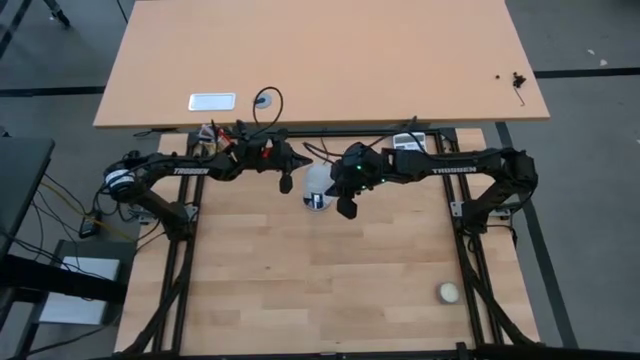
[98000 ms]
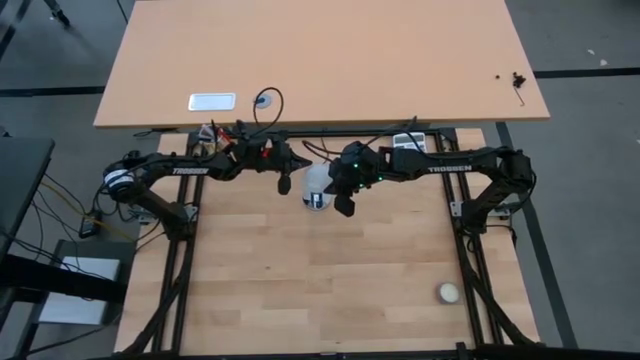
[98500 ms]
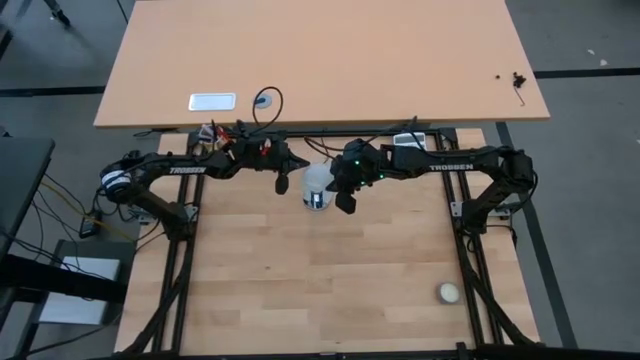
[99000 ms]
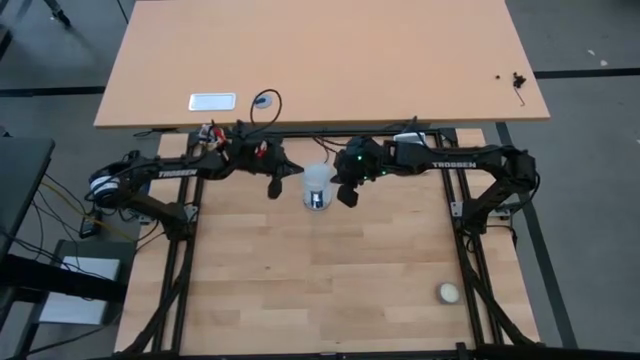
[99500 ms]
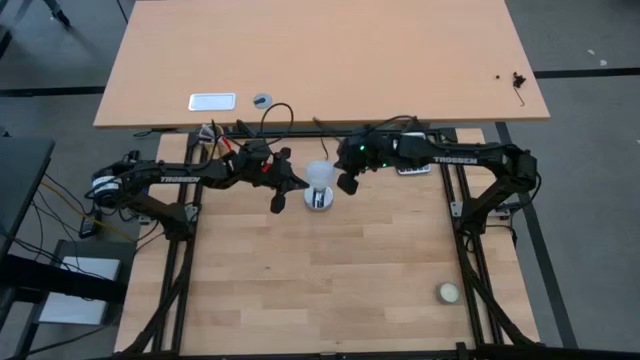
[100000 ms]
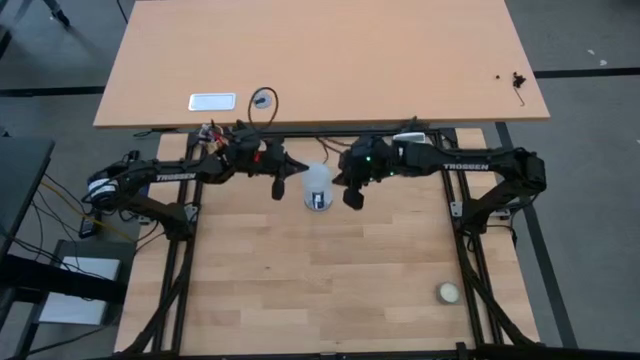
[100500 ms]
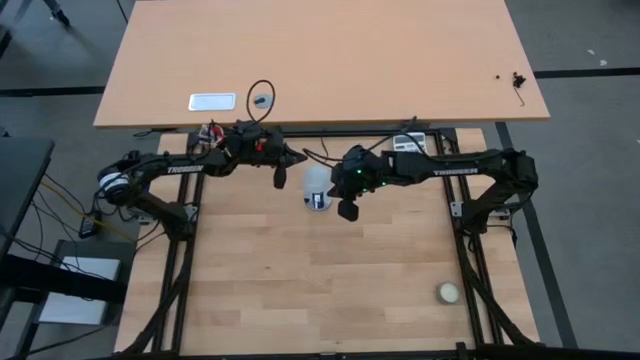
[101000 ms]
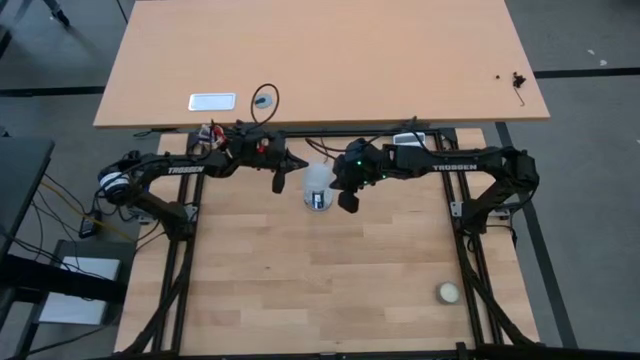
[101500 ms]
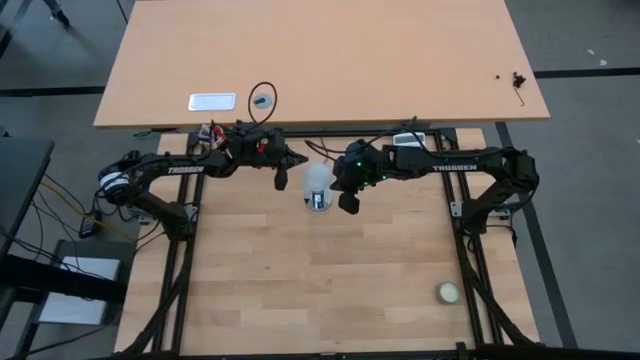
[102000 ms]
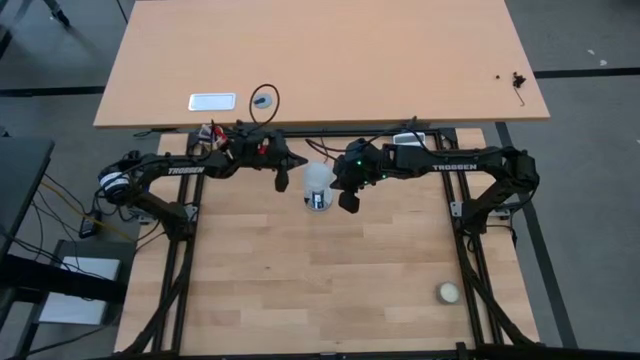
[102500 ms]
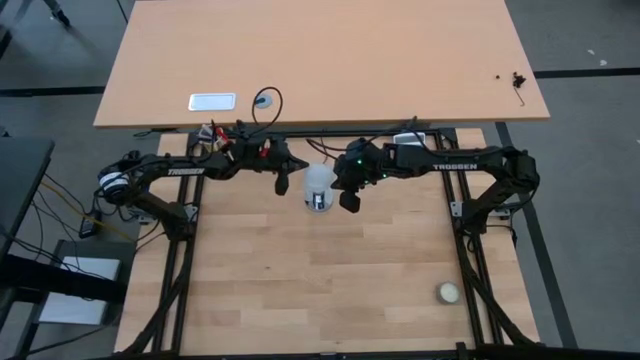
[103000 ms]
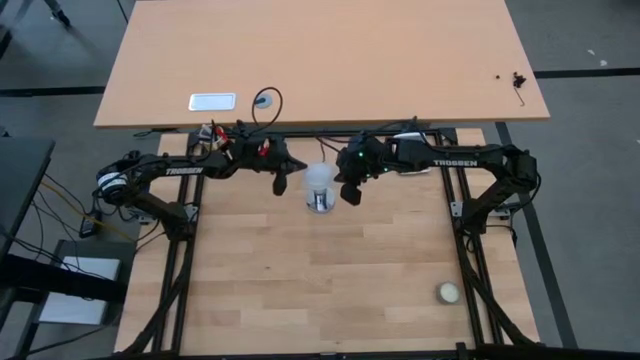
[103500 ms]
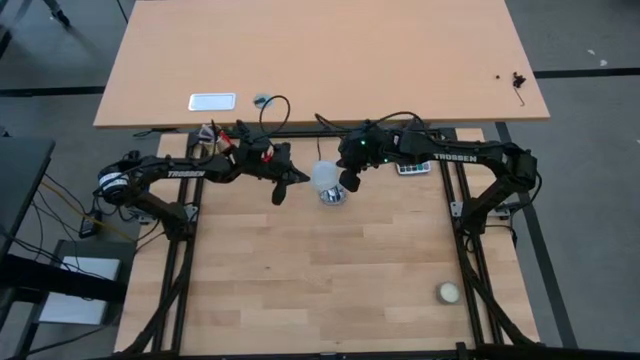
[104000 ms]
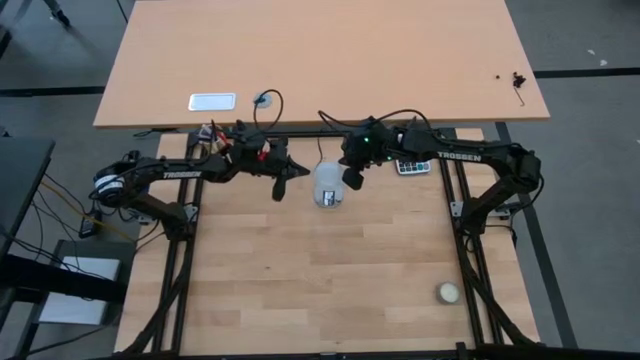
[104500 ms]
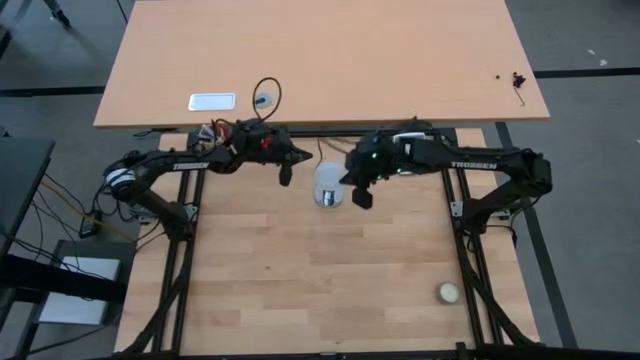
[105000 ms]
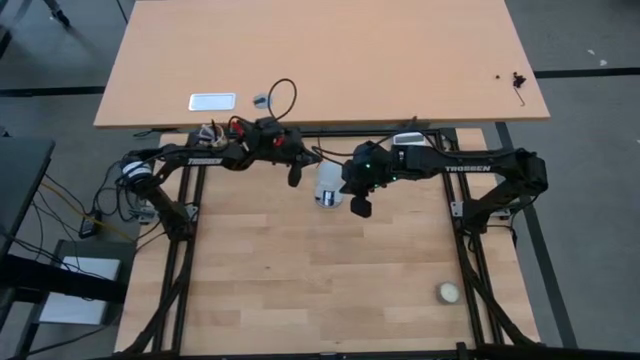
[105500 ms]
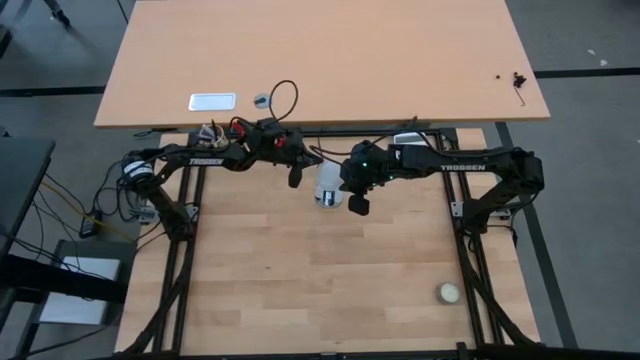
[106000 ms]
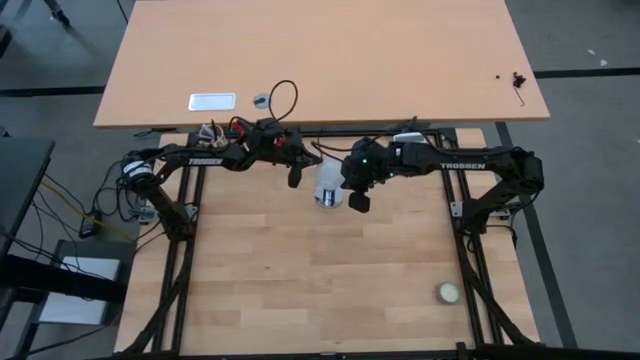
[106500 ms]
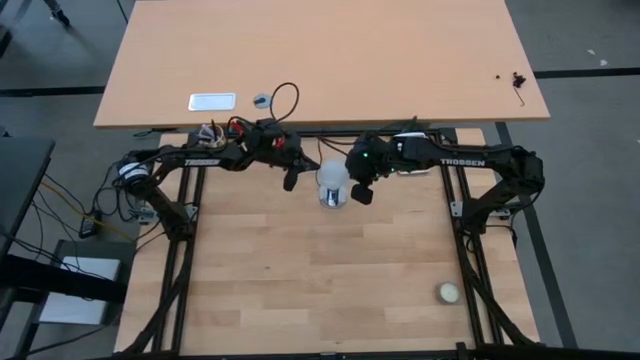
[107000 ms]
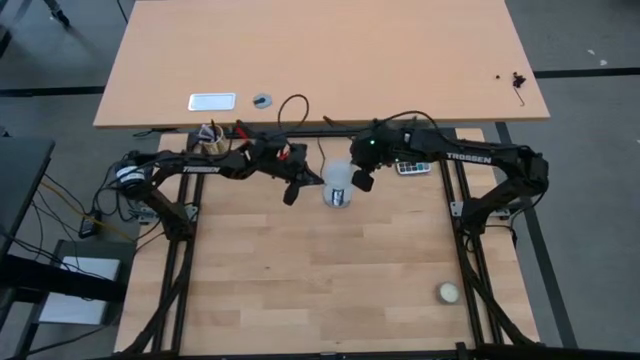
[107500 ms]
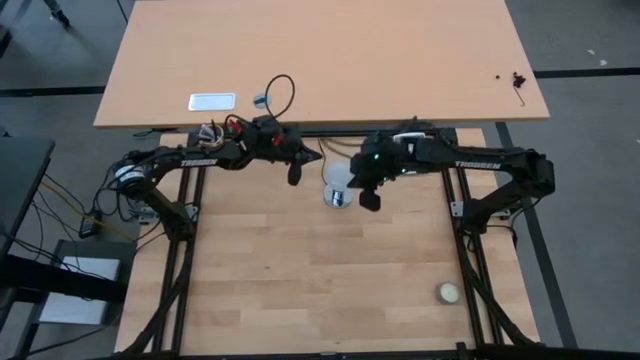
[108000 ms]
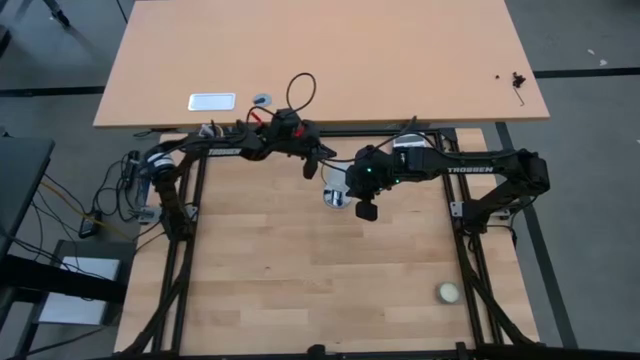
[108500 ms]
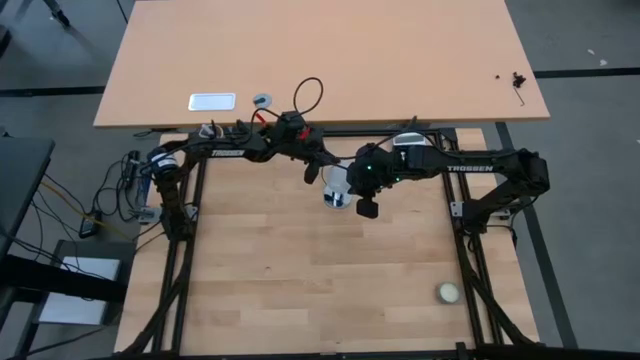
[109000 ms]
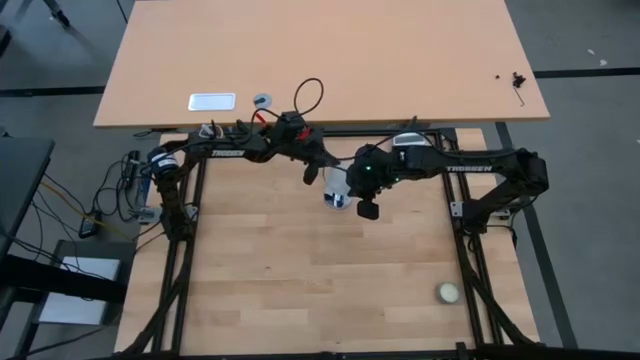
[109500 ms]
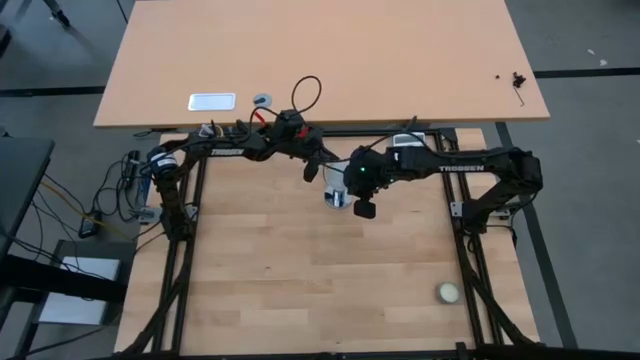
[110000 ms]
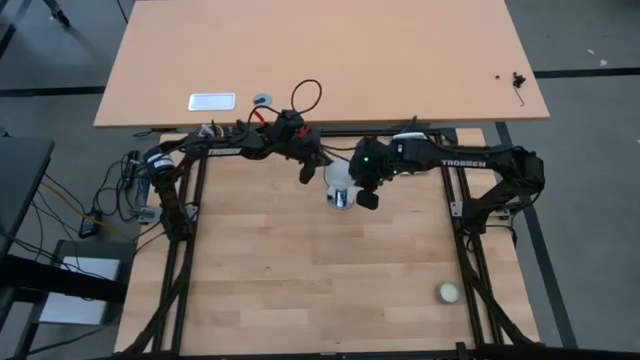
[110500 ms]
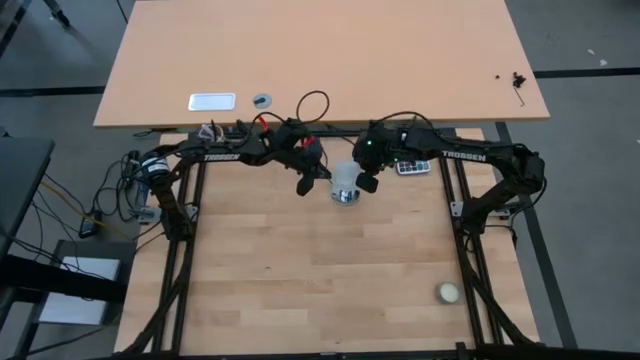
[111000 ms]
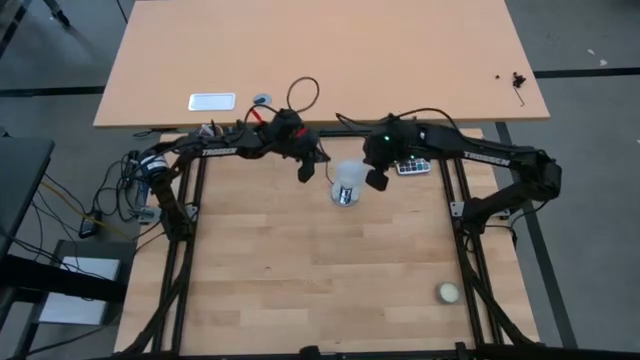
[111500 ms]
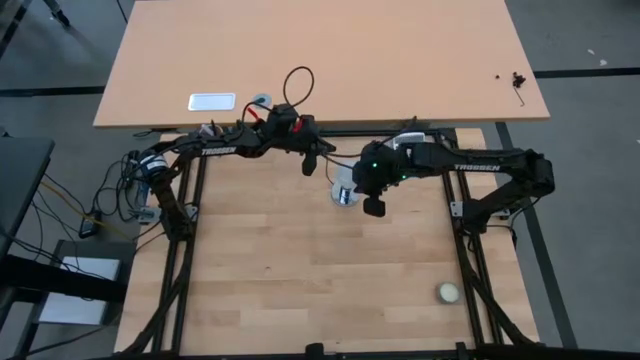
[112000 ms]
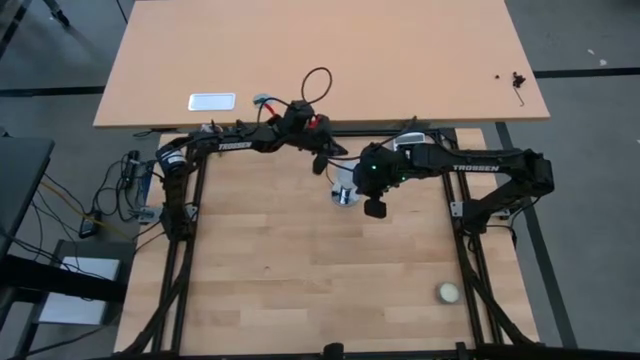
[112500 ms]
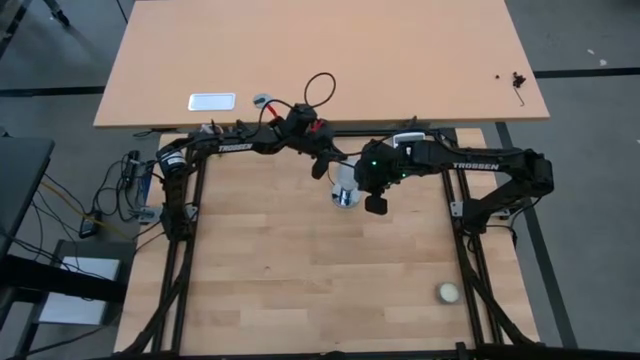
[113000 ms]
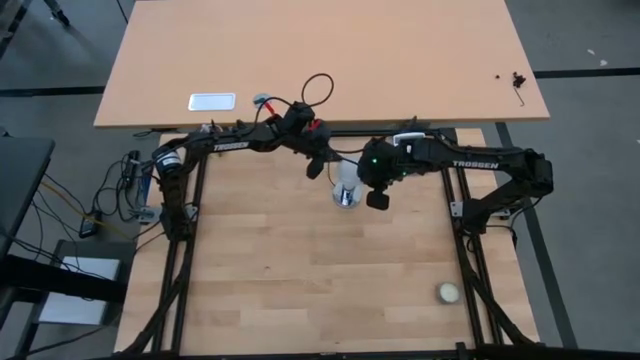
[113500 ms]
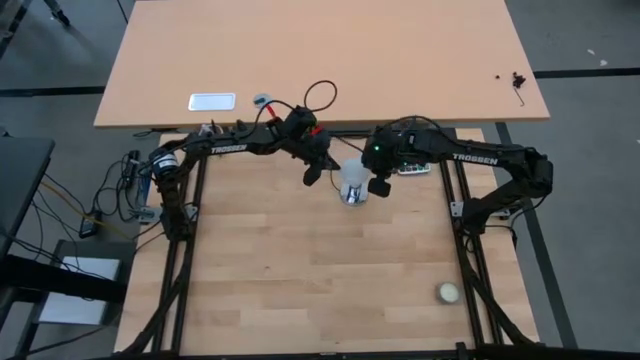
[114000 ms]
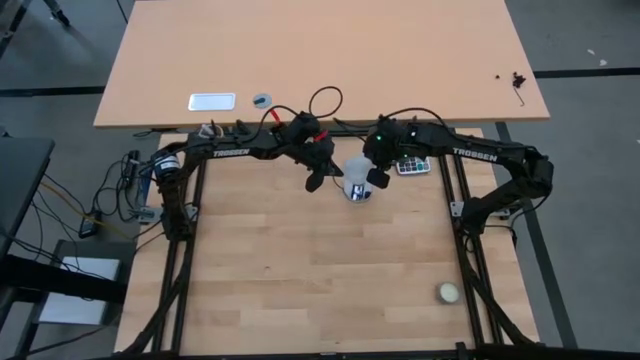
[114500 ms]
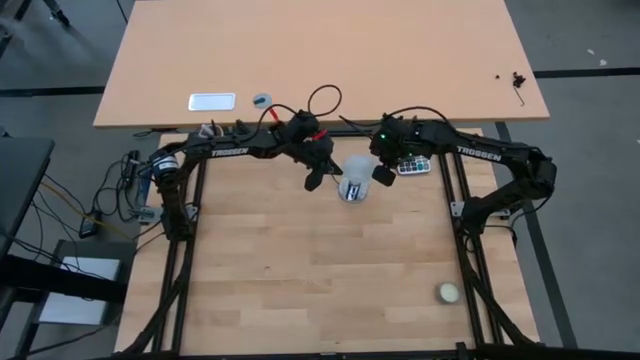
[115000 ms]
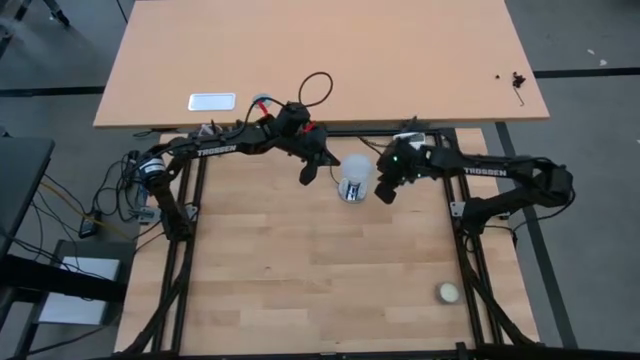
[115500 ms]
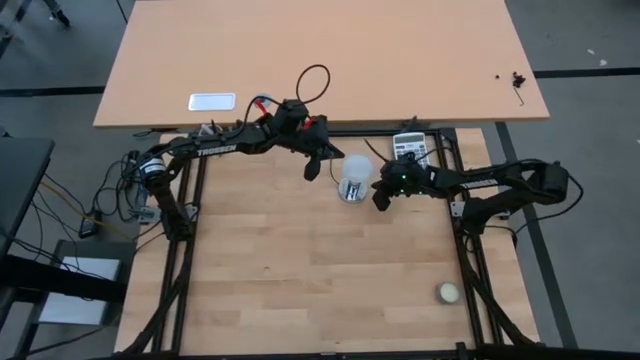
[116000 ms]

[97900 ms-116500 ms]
Task: Screw lightbulb
Remove the white lightbulb from the silver lamp

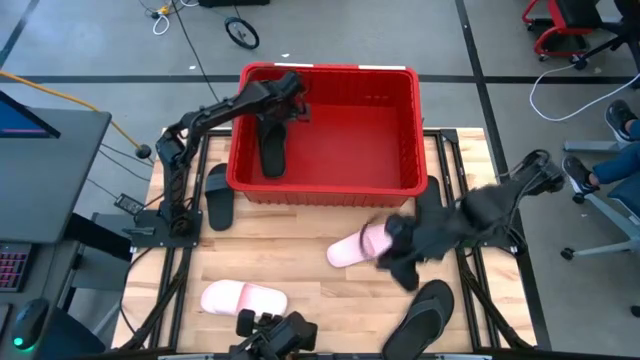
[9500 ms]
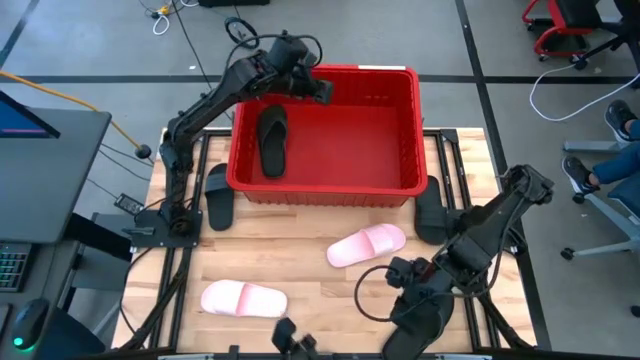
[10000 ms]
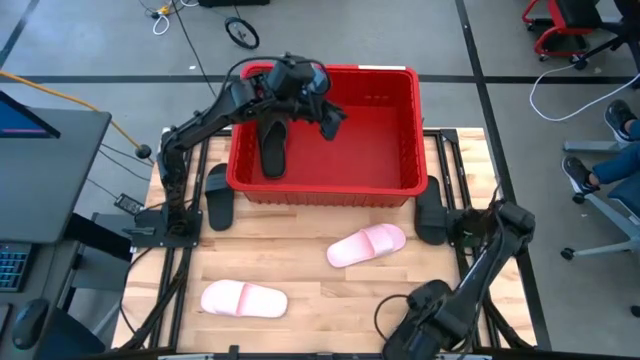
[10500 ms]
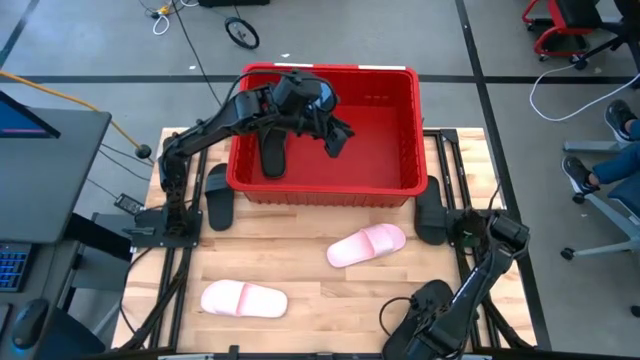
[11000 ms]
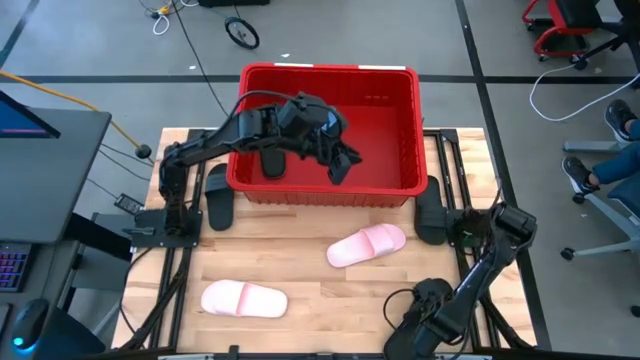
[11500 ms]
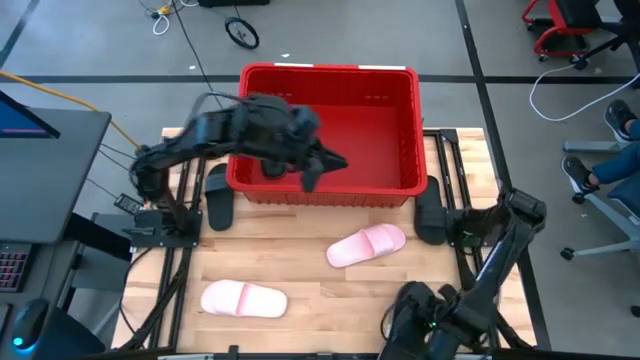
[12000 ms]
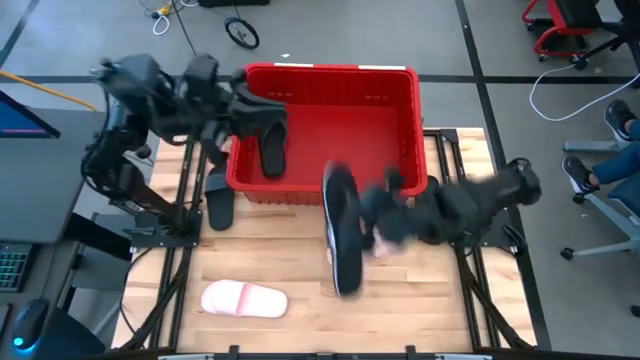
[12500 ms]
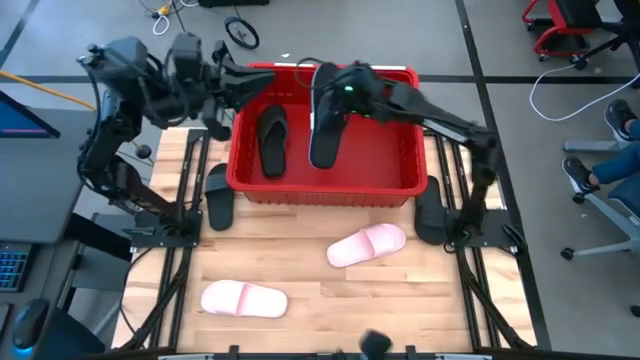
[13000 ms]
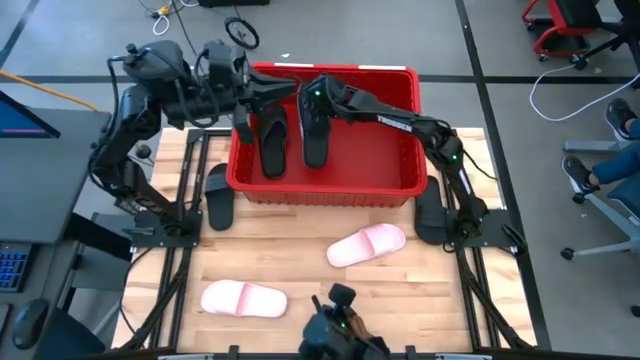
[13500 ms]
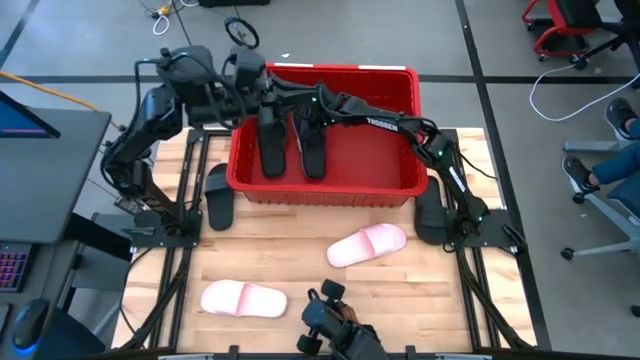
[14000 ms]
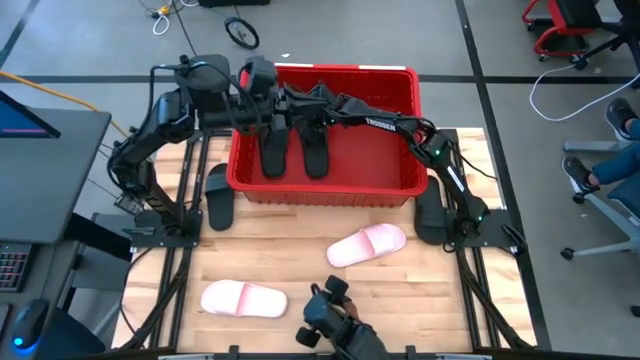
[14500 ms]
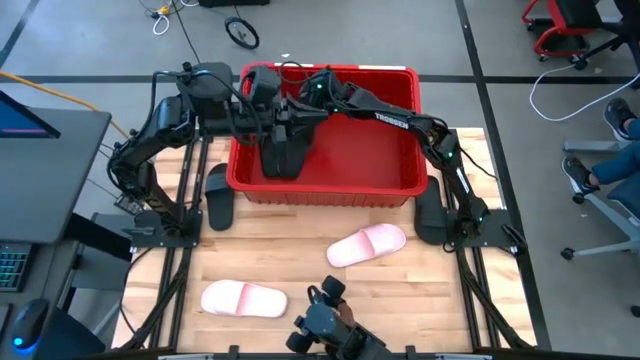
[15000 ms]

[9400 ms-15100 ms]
Task: Pick and place slides into bin
Put the black slipper into the red bin
